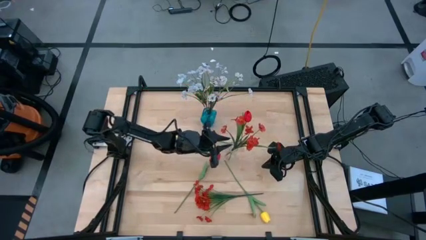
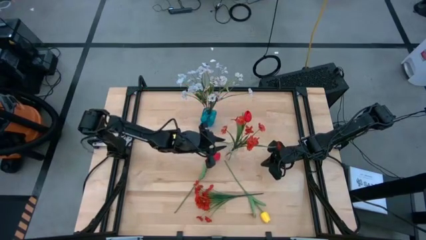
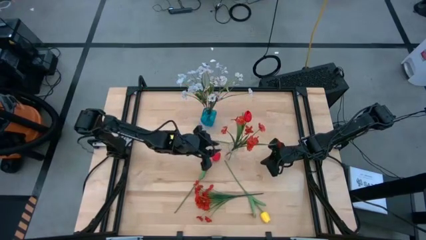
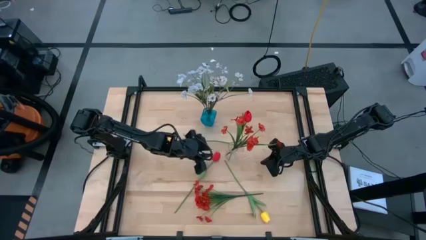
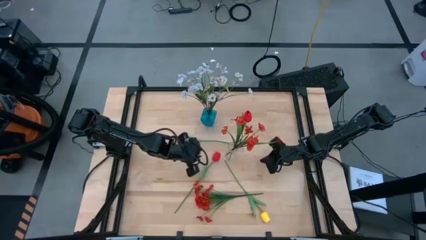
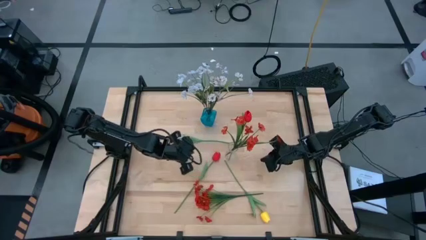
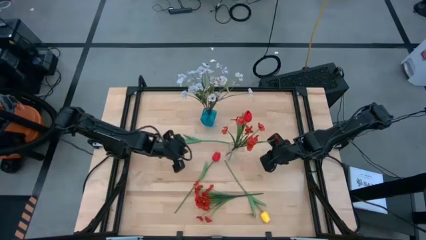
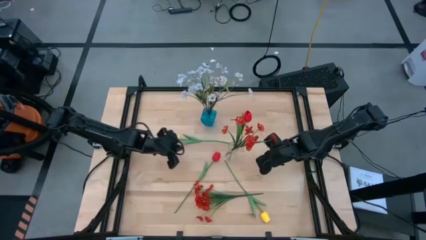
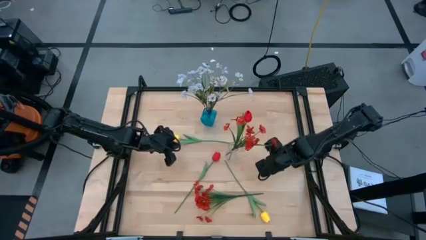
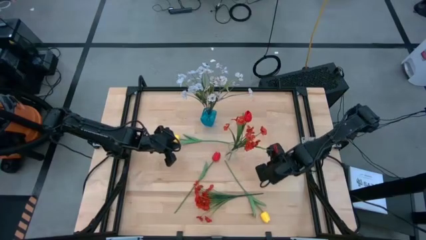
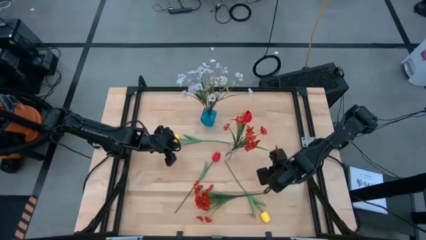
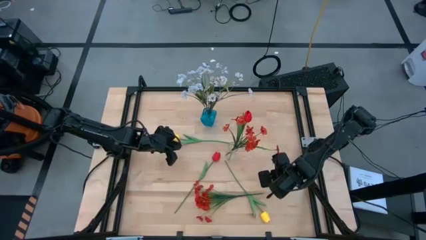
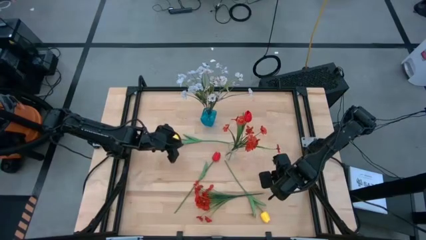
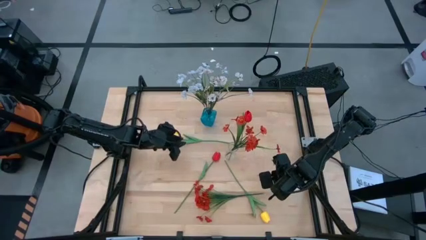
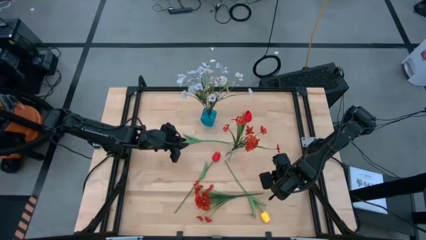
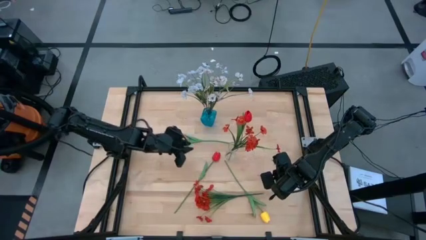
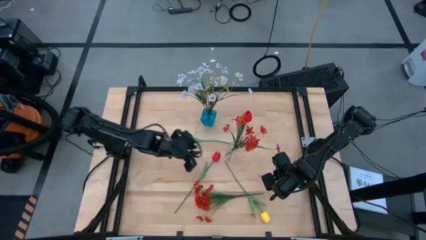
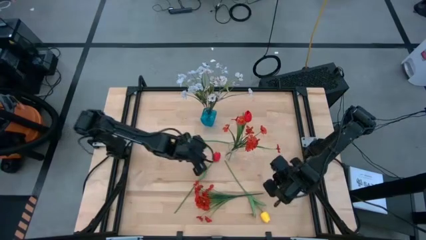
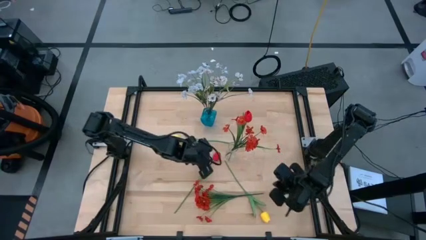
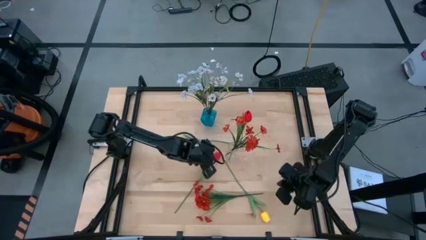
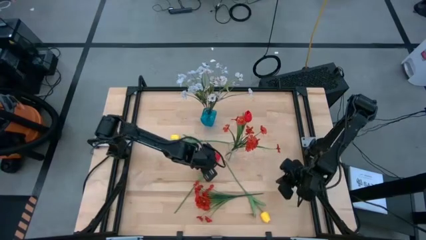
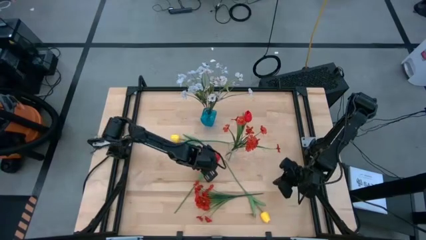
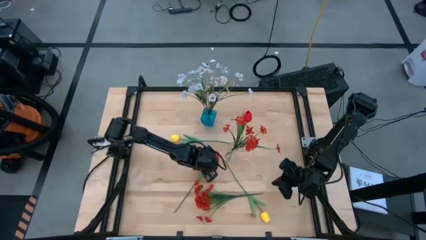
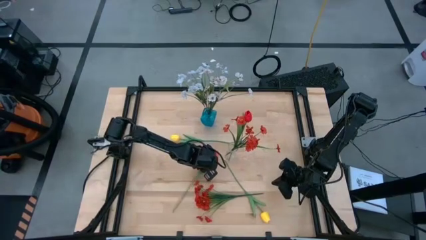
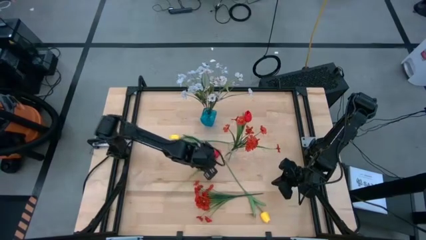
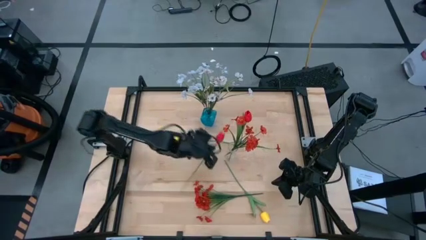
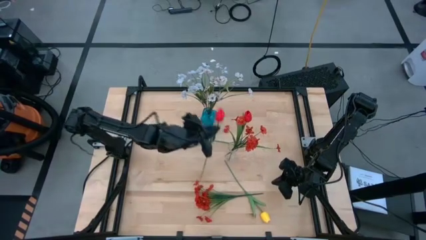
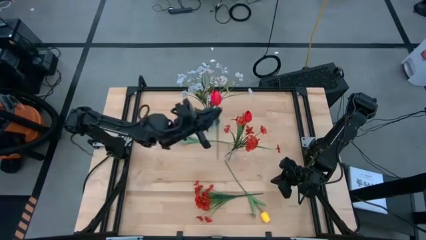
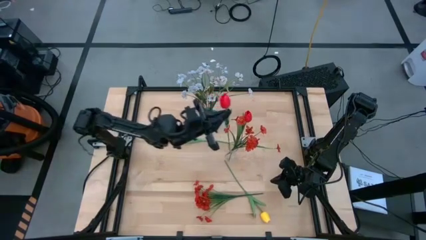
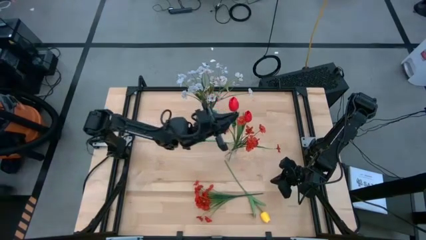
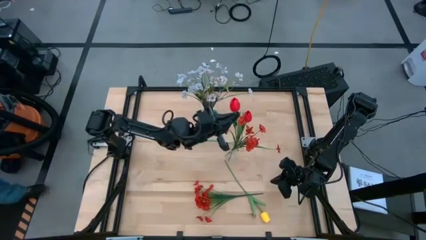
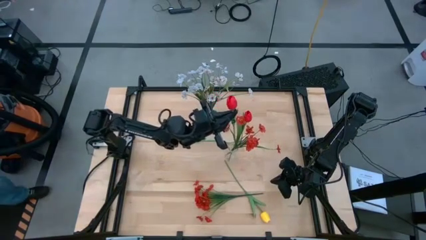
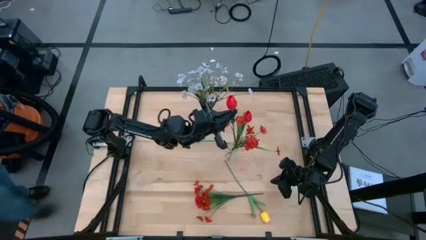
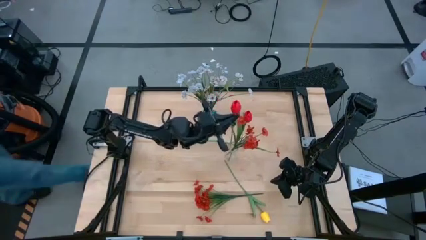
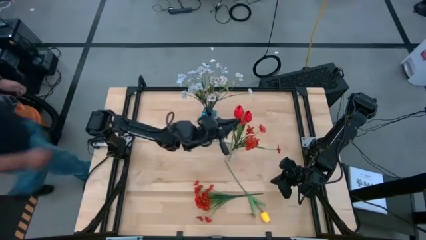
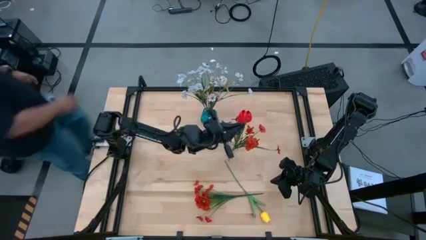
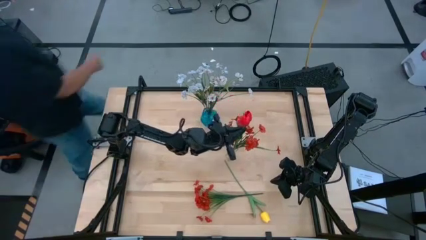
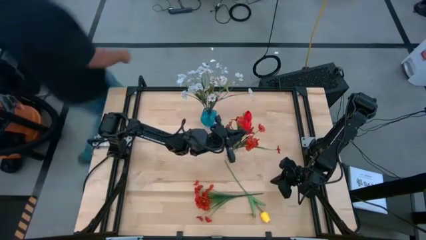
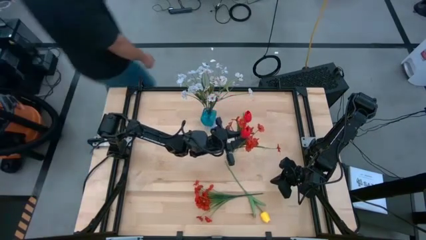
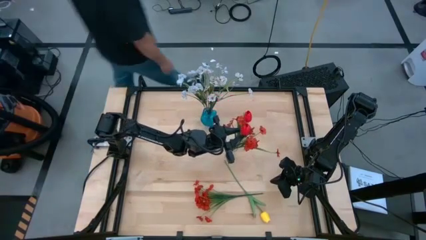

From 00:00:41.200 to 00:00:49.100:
Task: Sort flowers into vase by color
Put the red tulip into the transparent vase

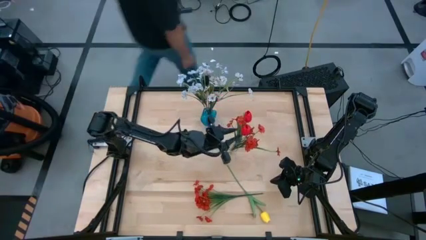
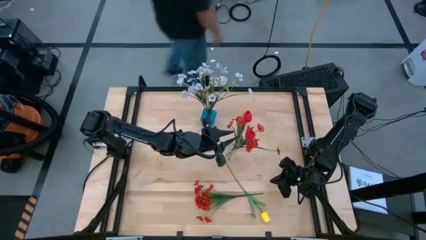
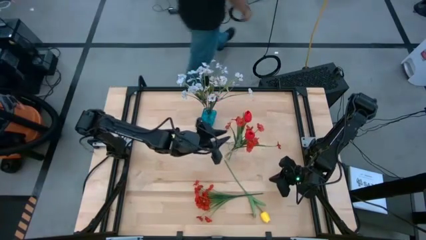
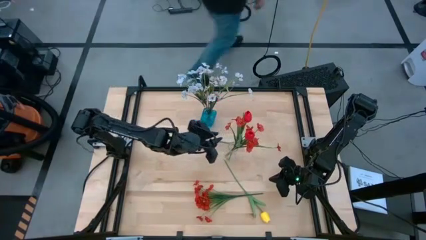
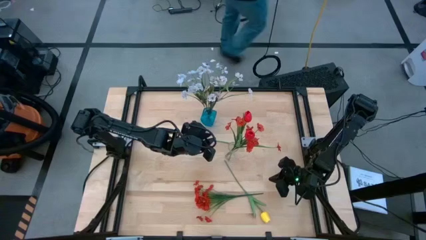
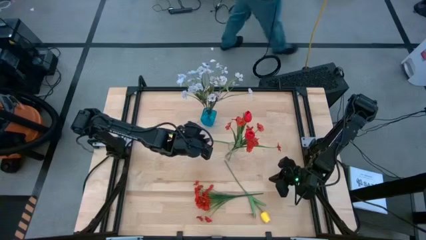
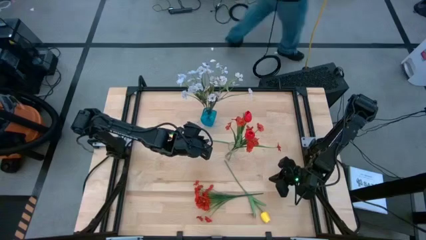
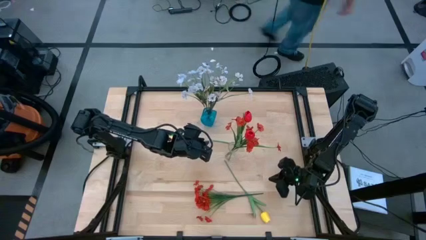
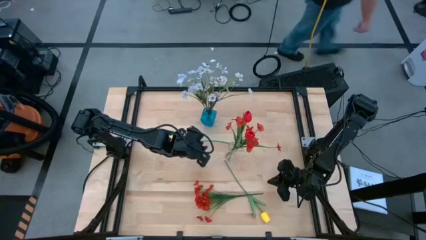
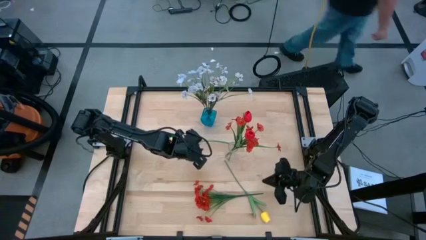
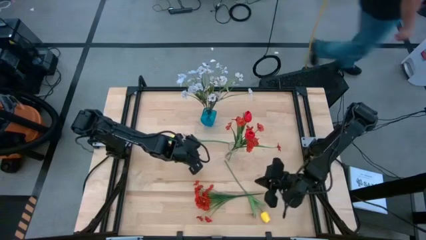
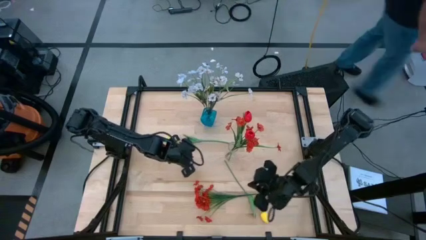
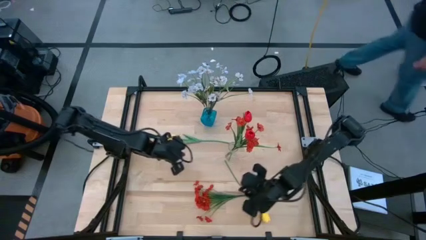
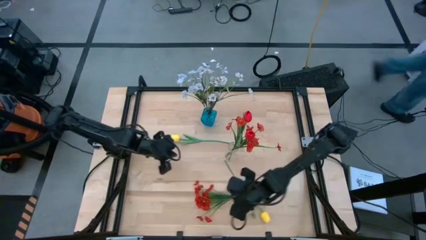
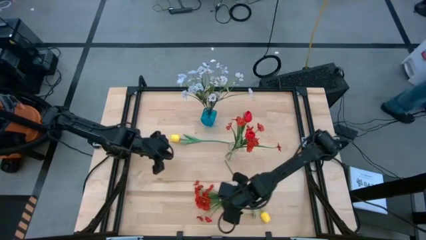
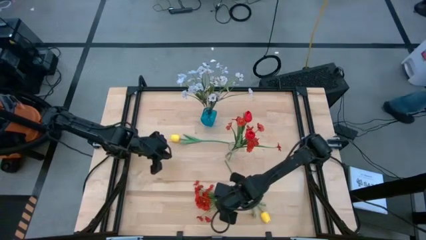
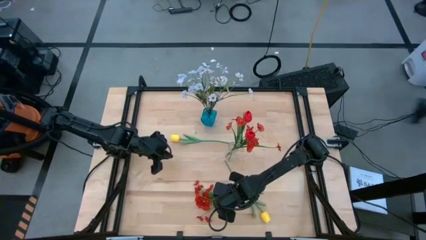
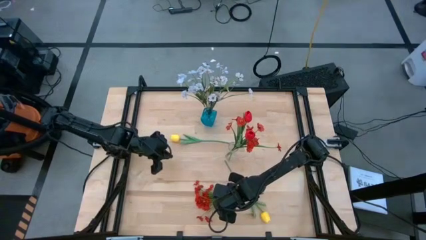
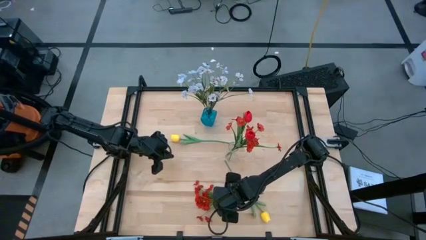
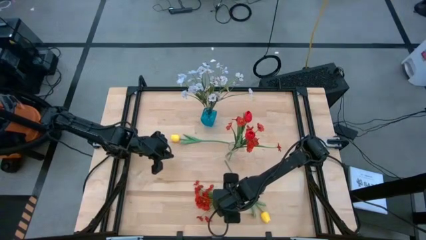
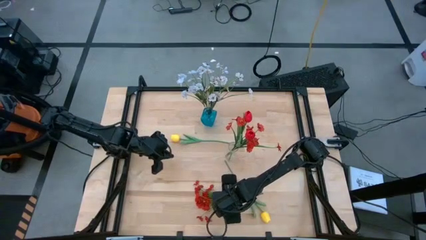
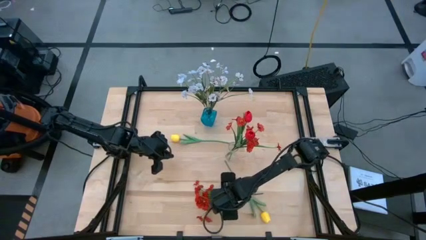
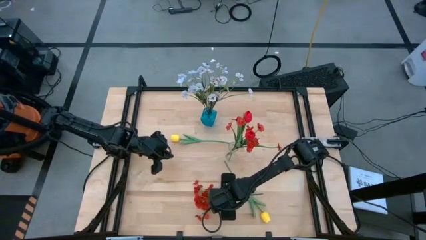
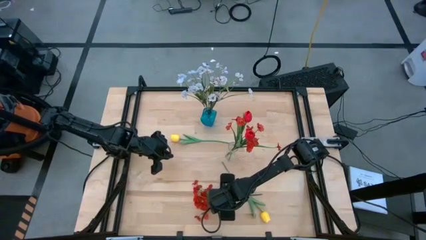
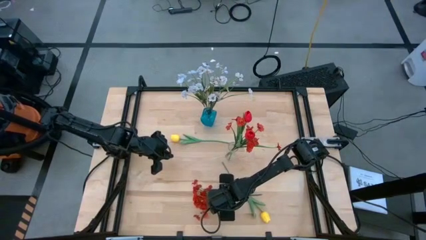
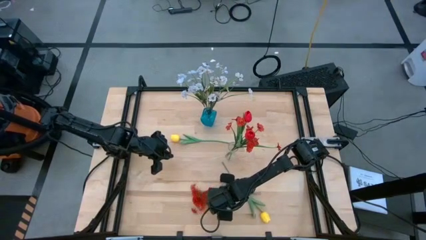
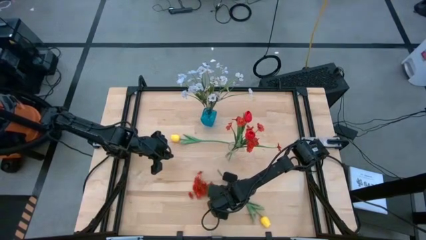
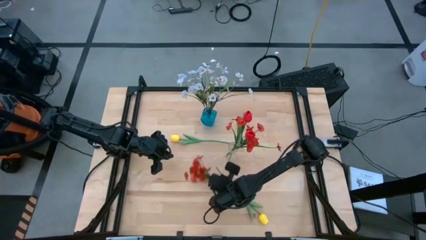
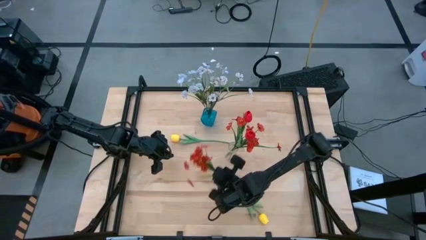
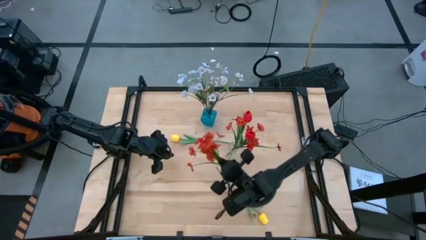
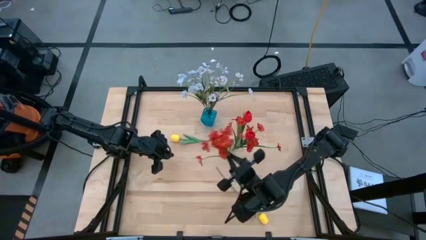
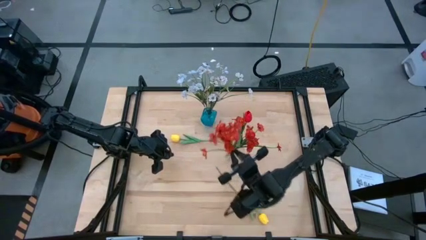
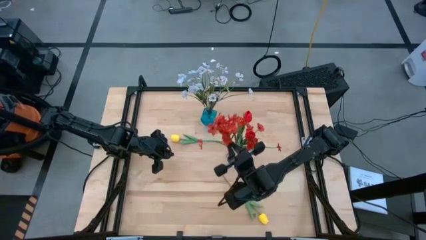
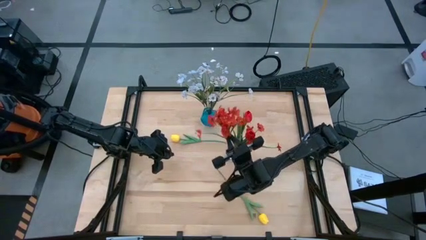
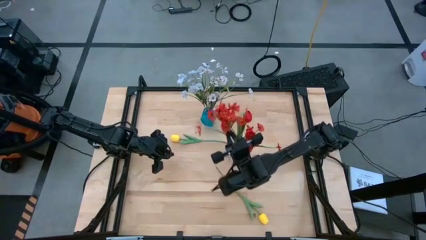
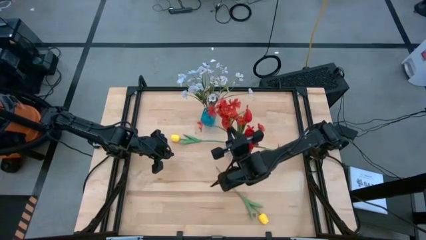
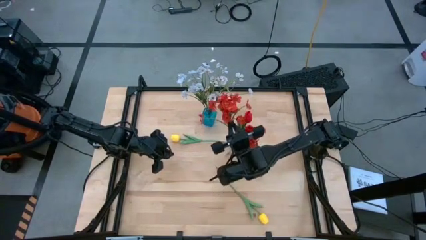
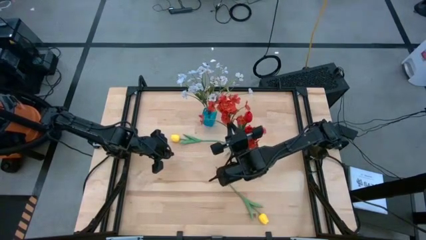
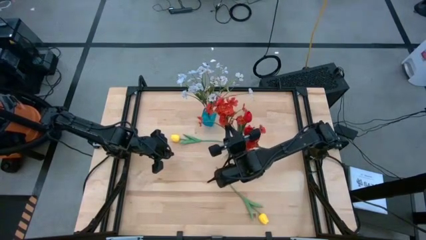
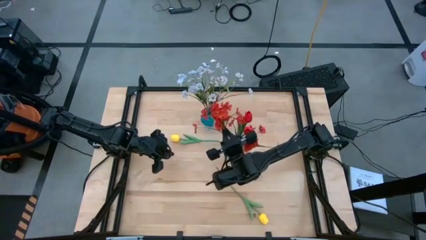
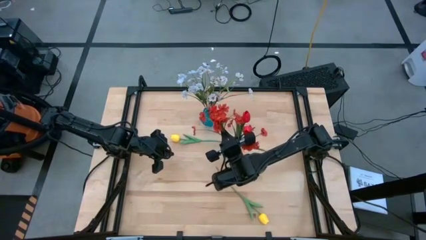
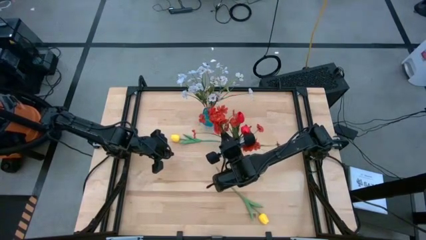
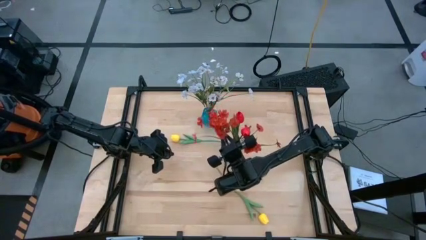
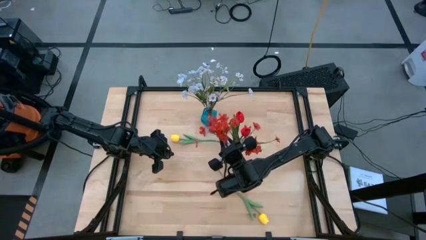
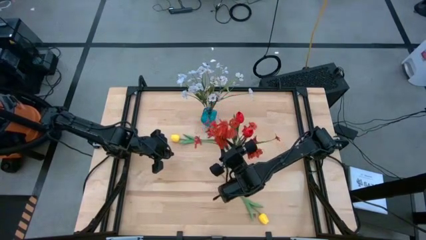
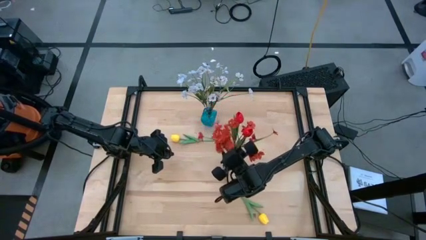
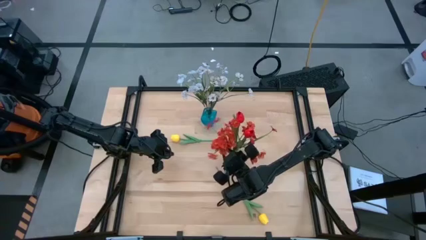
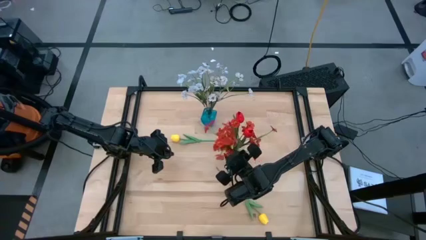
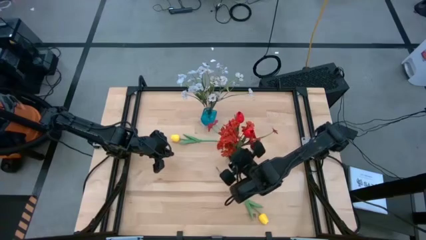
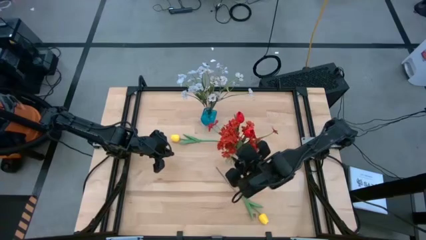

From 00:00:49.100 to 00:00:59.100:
Put the orange flowers into the transparent vase
